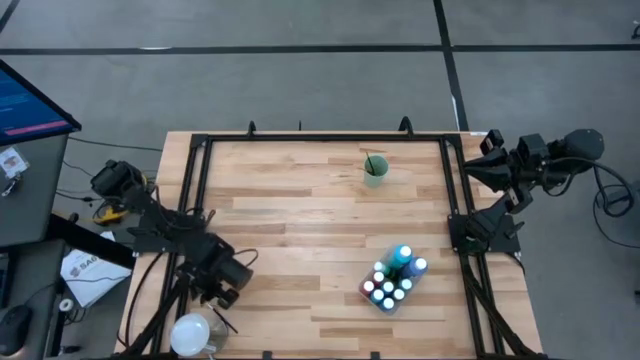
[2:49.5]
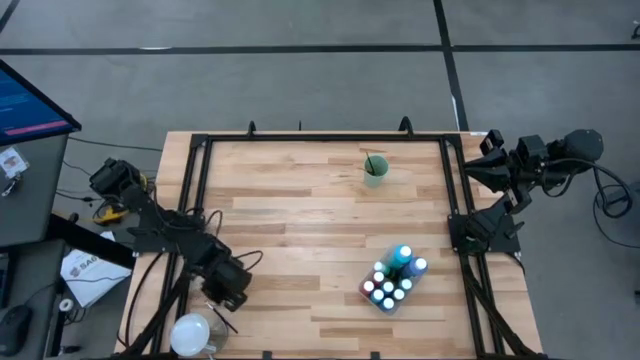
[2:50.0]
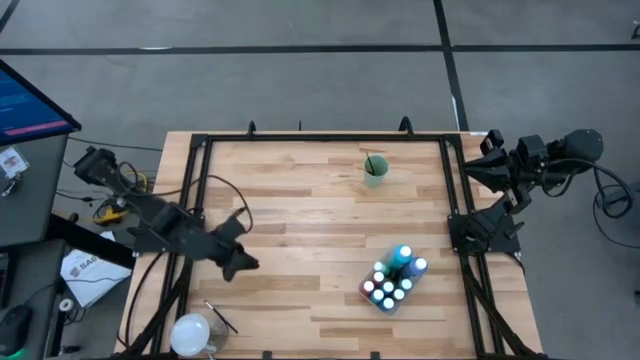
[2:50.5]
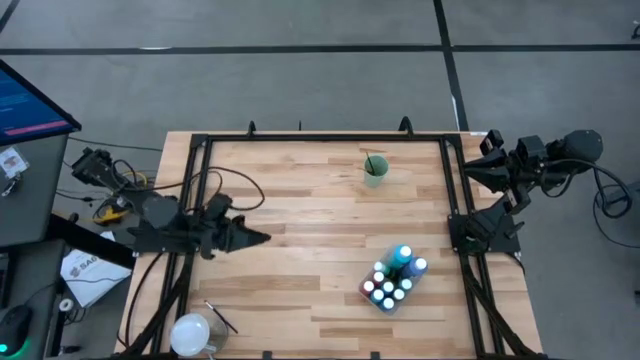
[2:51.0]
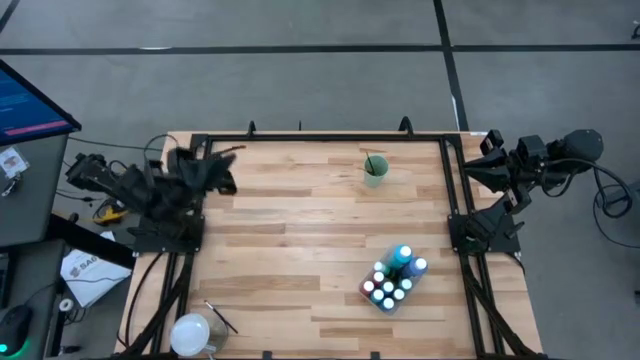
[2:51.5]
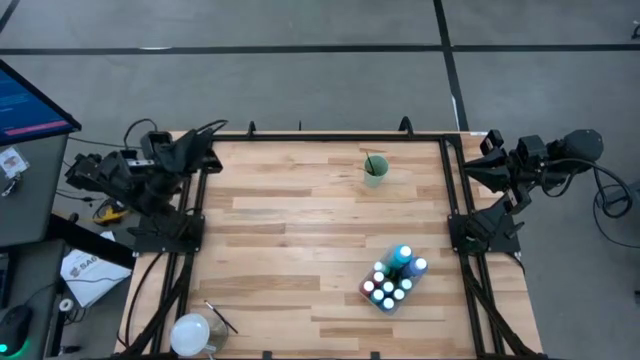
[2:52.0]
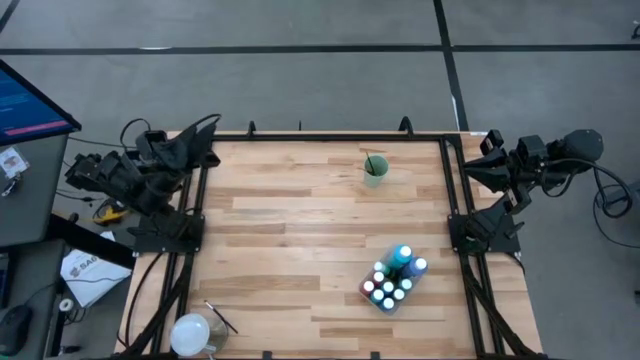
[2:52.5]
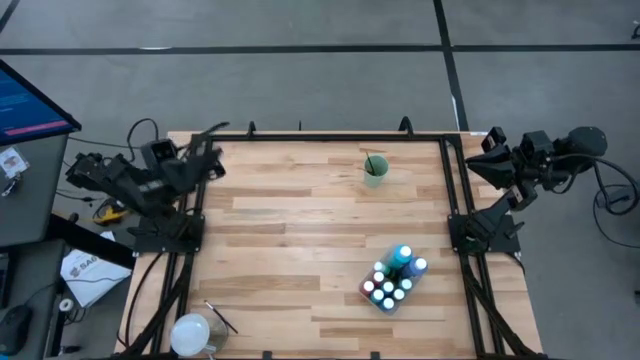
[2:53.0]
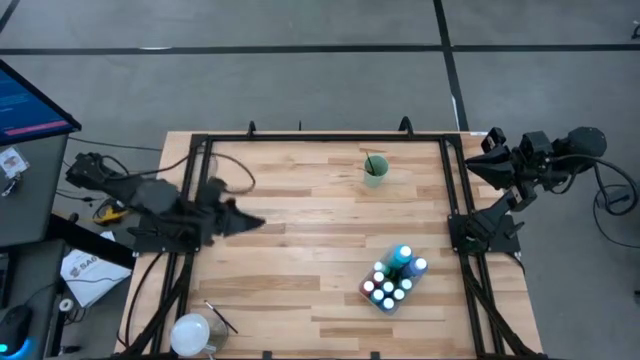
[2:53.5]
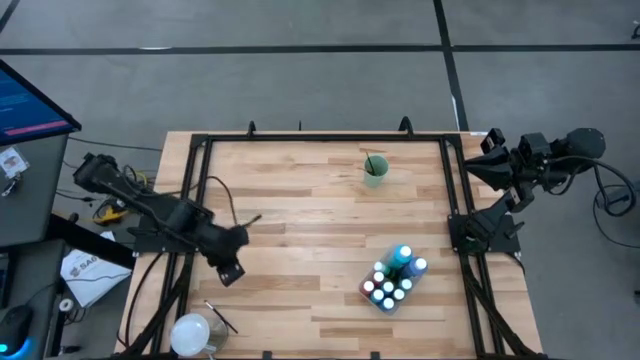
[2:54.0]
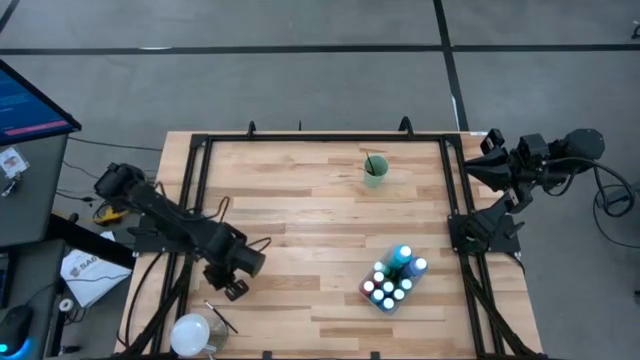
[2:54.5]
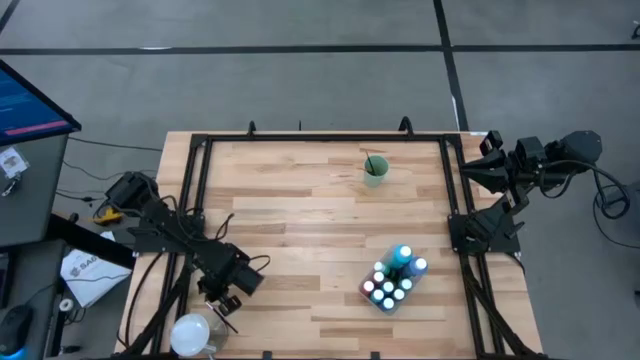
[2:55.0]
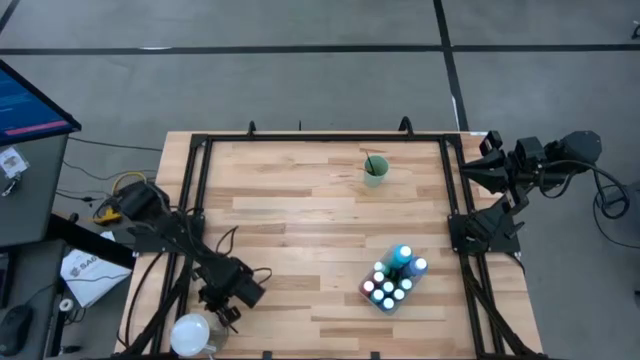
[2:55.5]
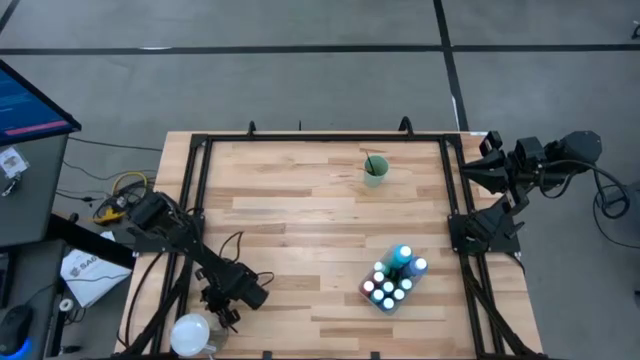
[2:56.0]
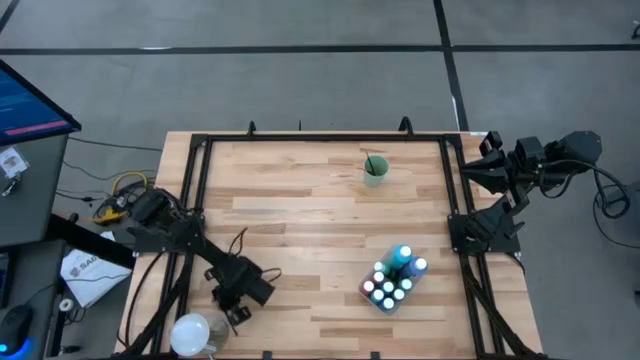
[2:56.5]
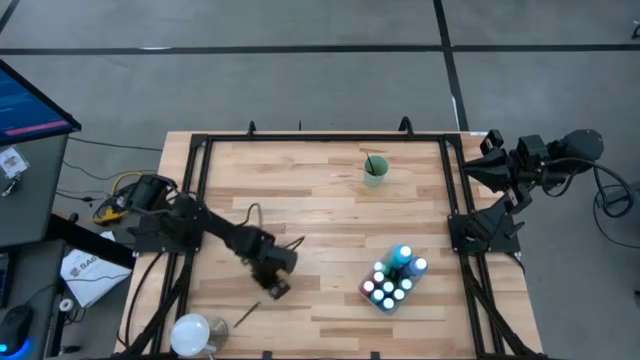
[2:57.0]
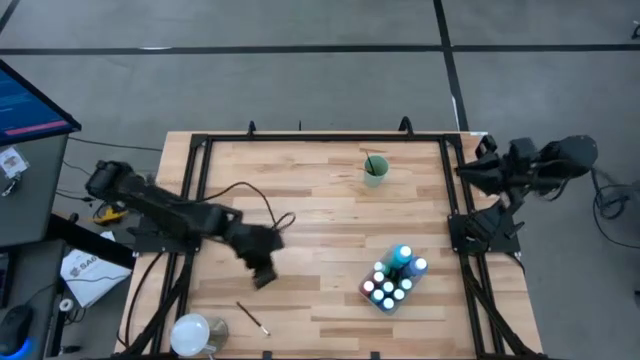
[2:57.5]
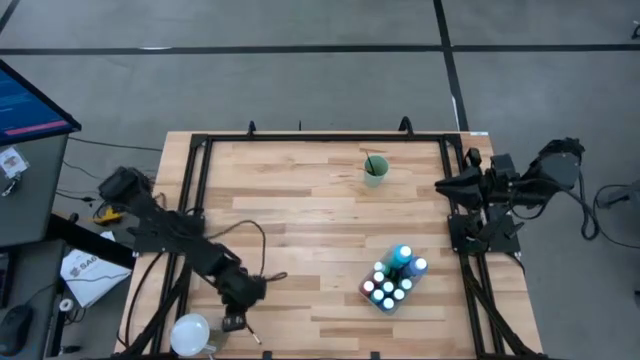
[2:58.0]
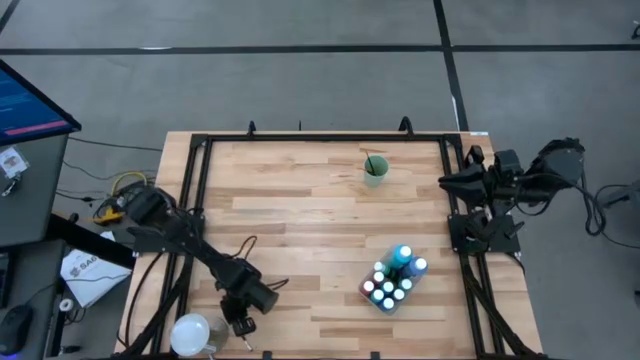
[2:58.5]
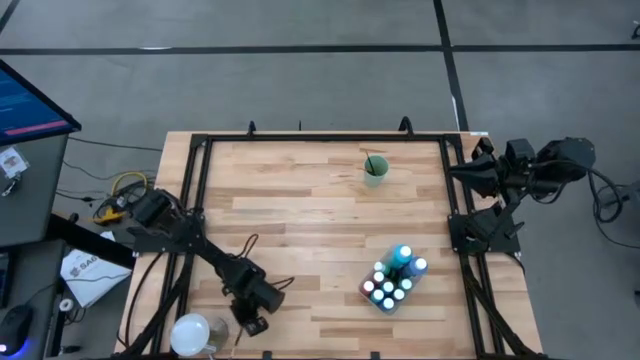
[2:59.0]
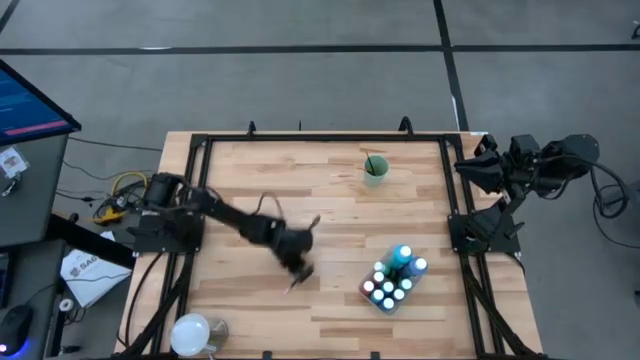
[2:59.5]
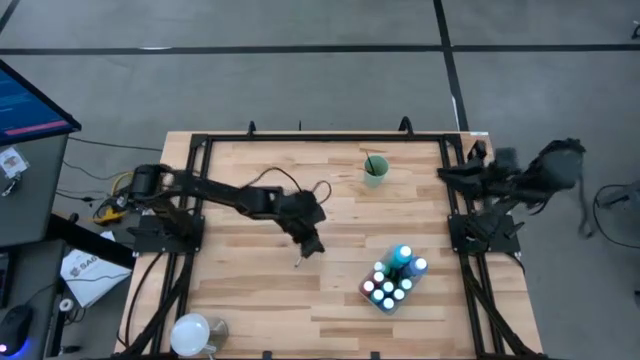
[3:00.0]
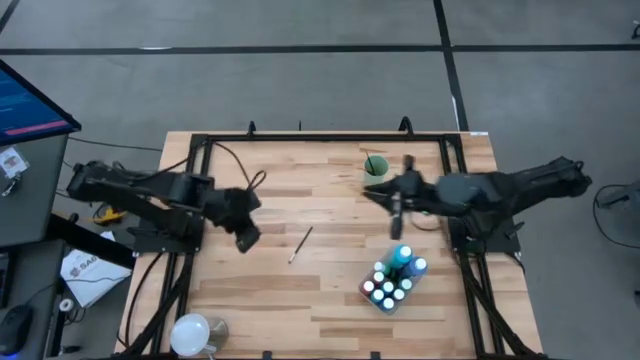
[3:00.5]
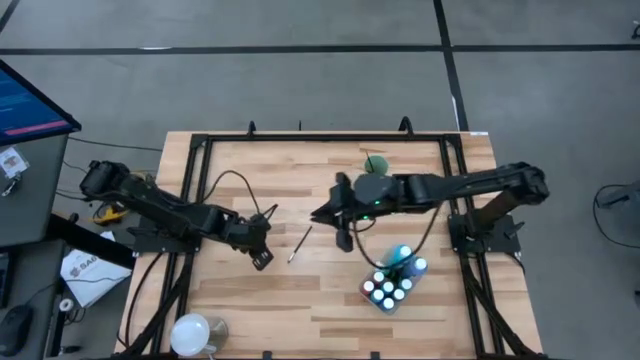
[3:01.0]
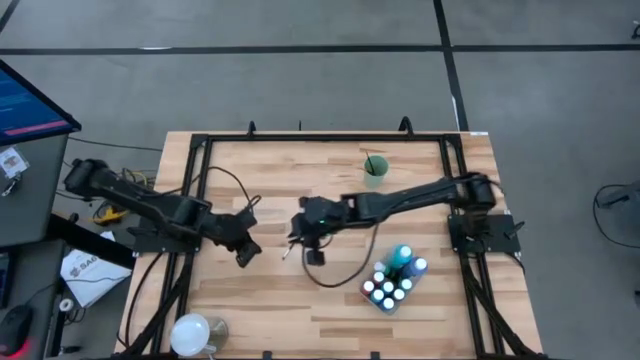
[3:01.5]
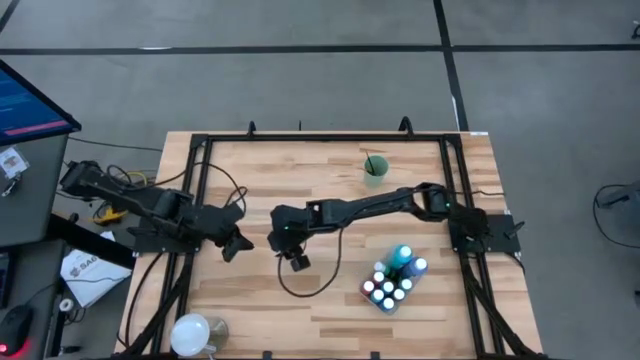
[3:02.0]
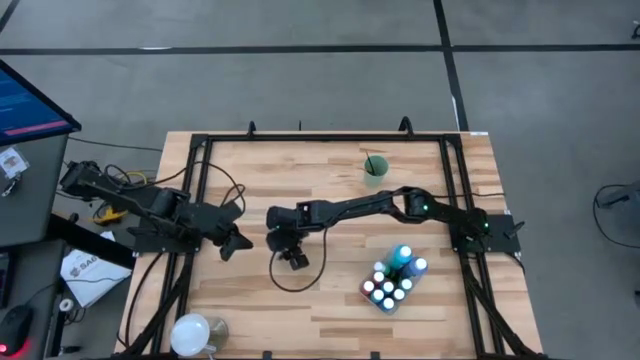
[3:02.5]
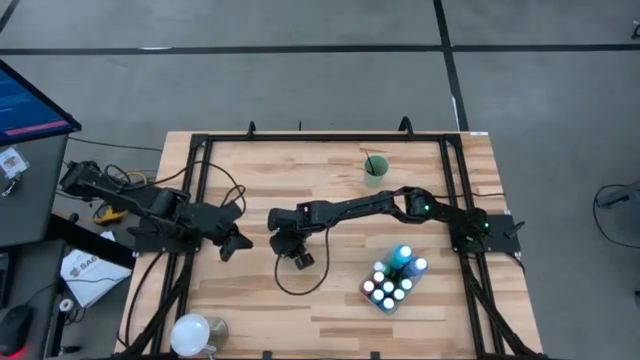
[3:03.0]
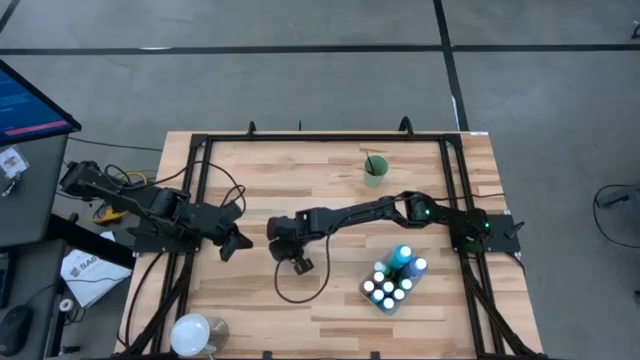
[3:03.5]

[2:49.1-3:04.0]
Task: Pick & Place Paint Supplies
Put the black paint brush into the green cup

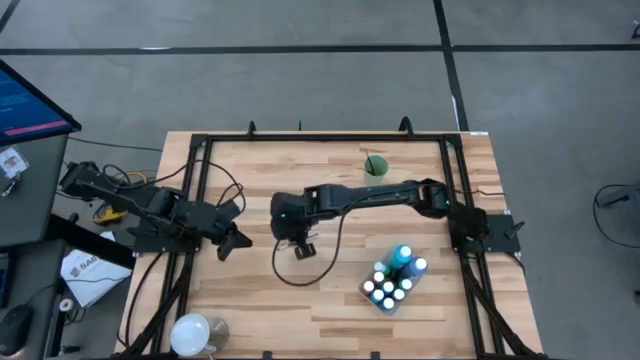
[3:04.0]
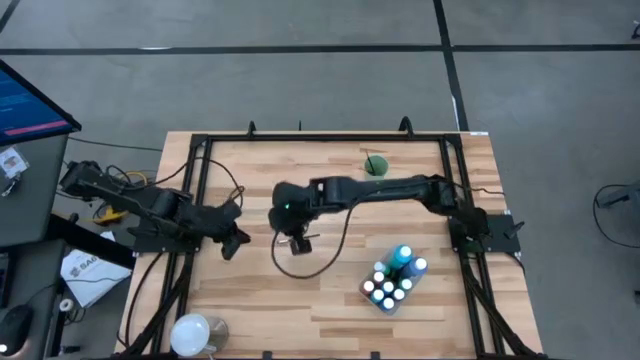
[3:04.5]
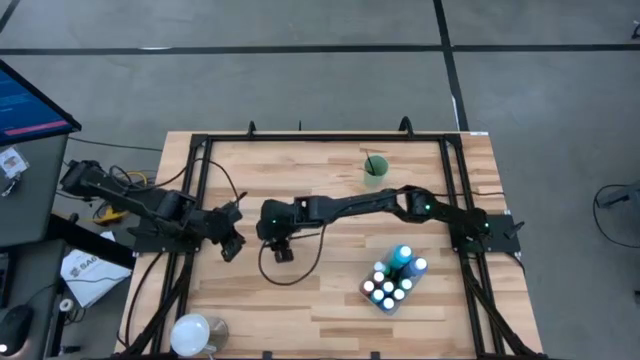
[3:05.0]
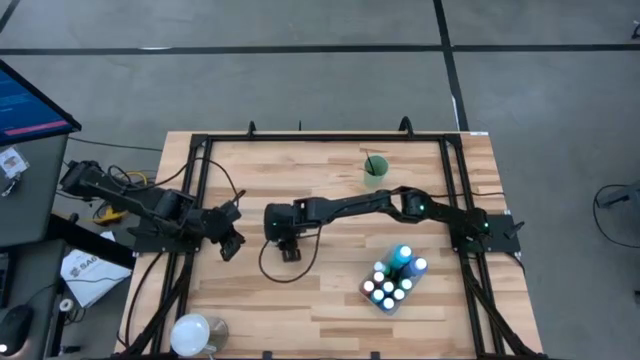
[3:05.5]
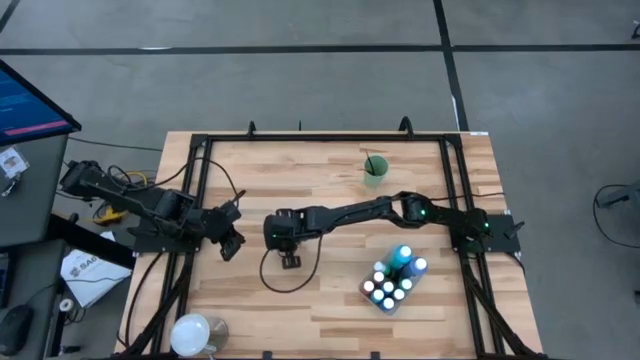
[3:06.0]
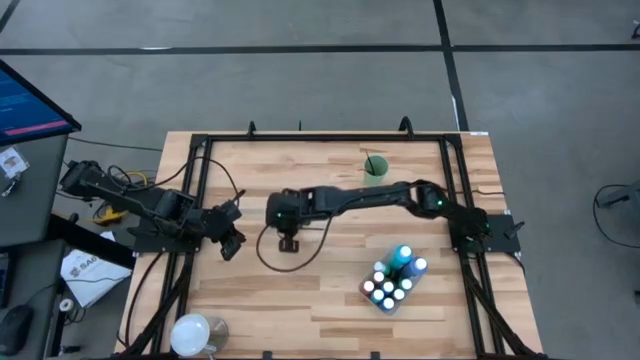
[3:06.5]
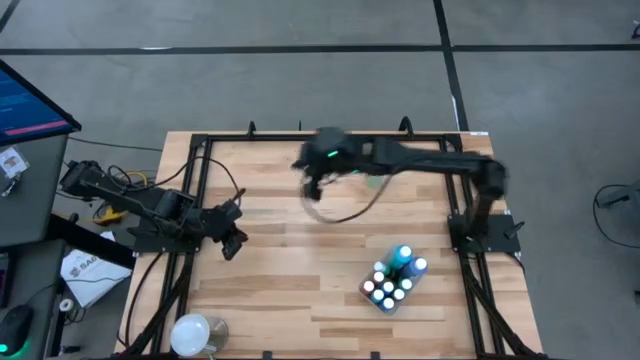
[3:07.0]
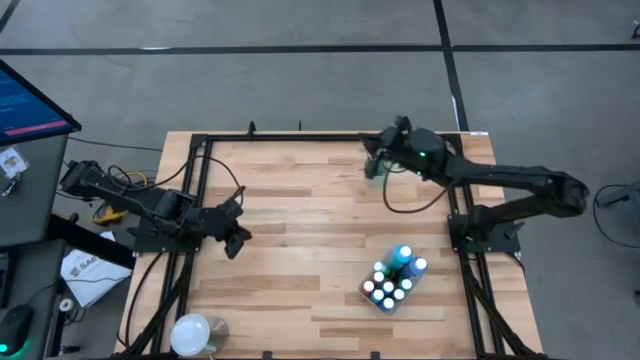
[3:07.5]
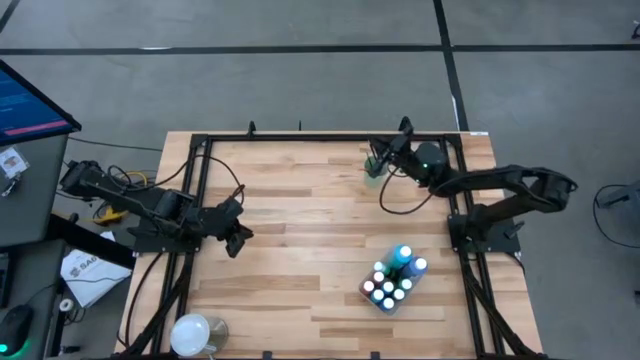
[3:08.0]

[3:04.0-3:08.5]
Put the black paint brush into the green cup
